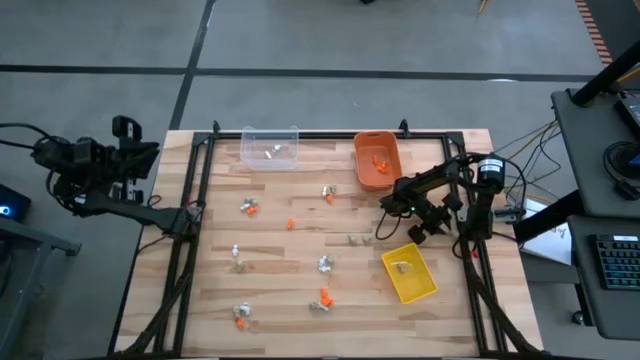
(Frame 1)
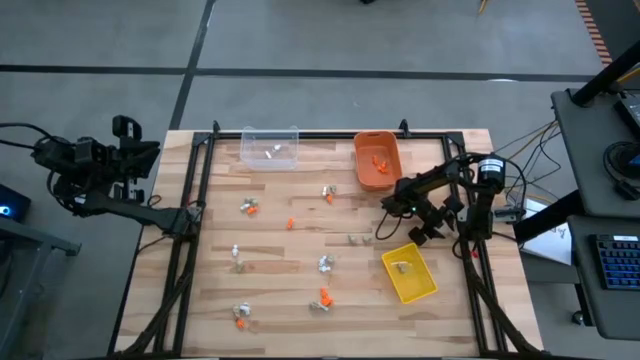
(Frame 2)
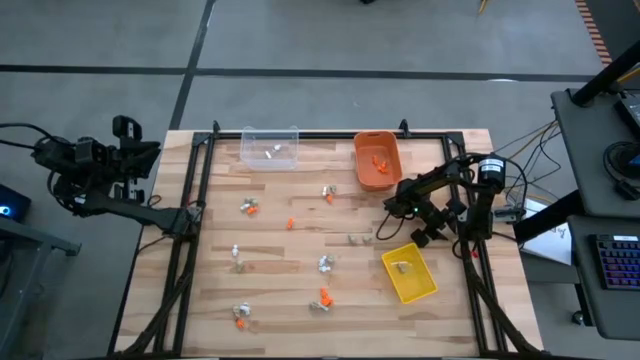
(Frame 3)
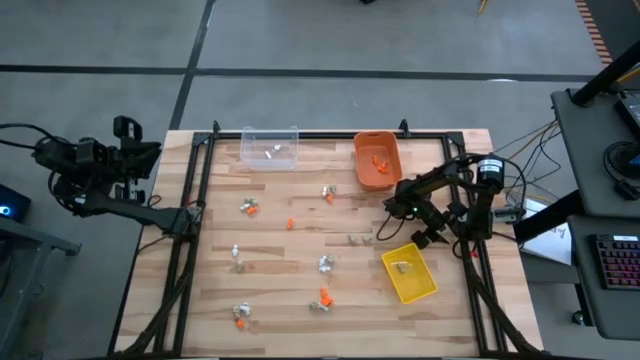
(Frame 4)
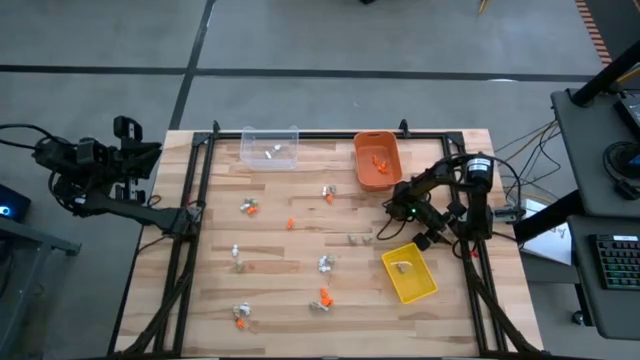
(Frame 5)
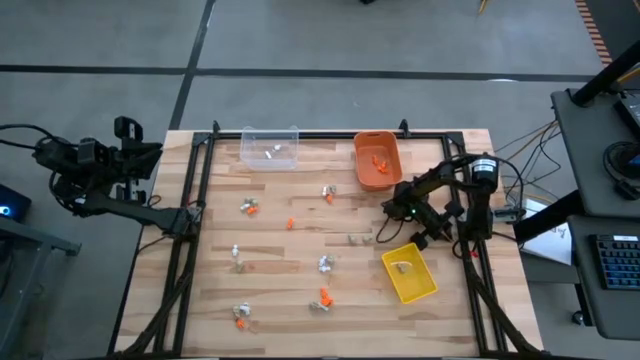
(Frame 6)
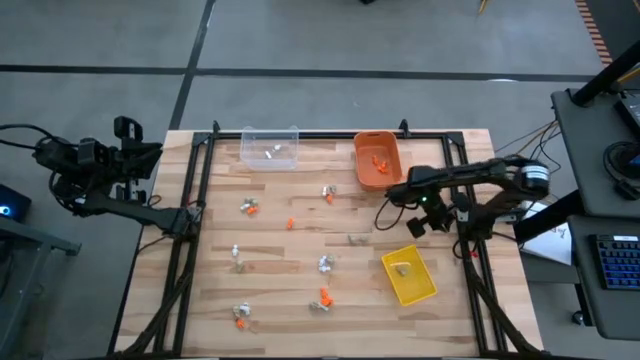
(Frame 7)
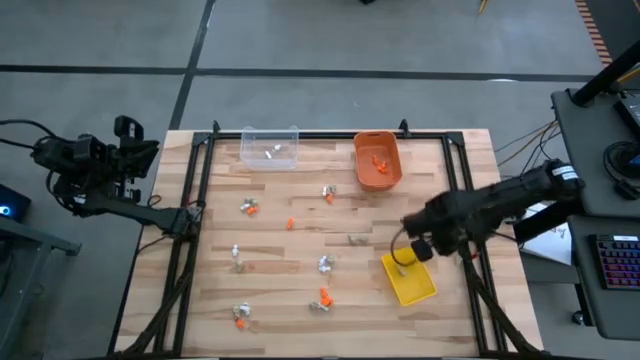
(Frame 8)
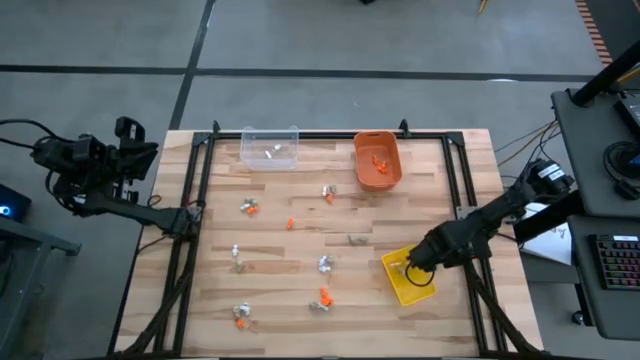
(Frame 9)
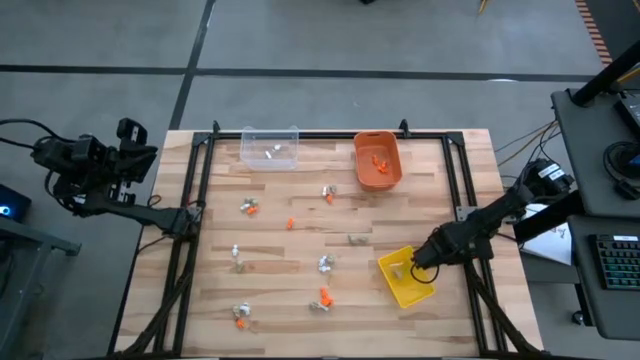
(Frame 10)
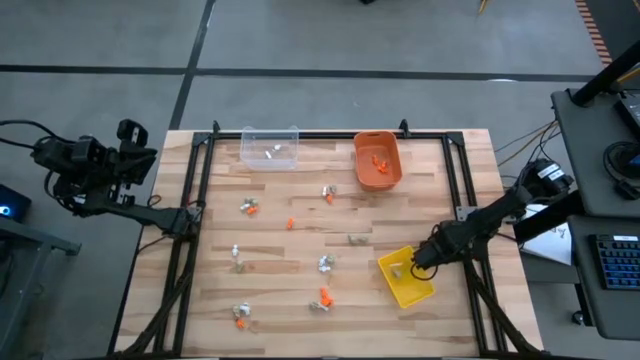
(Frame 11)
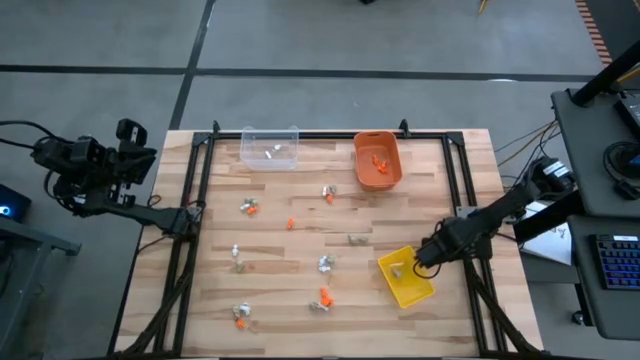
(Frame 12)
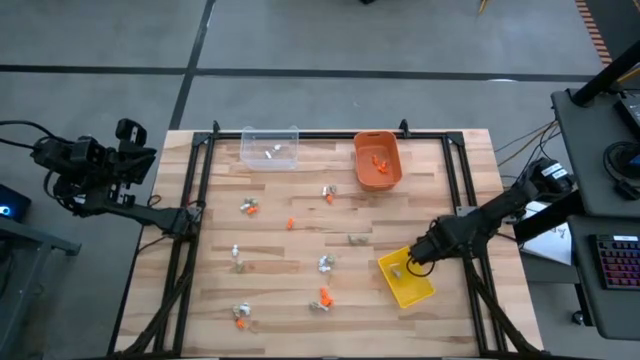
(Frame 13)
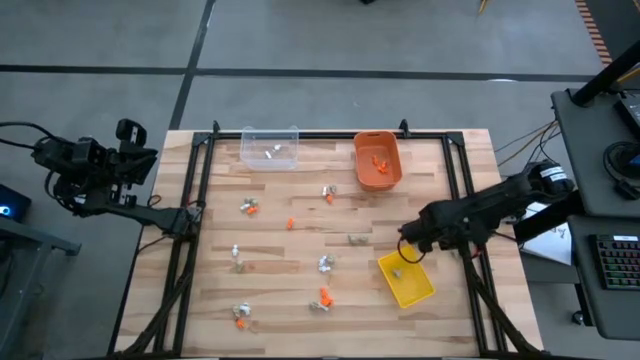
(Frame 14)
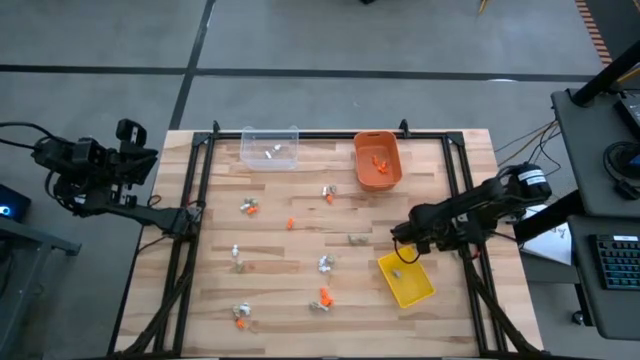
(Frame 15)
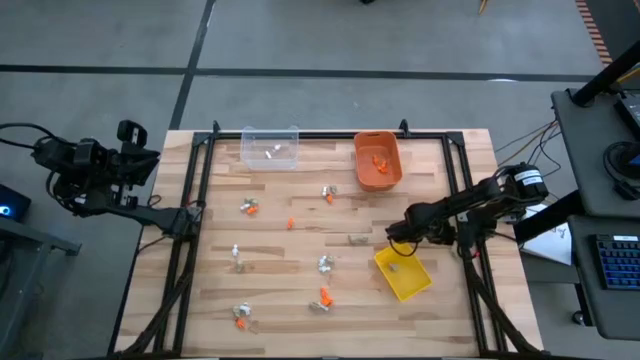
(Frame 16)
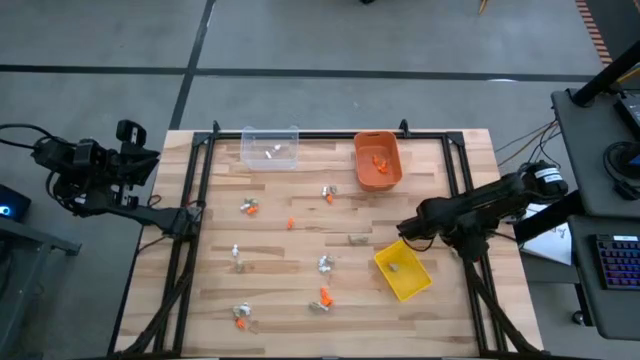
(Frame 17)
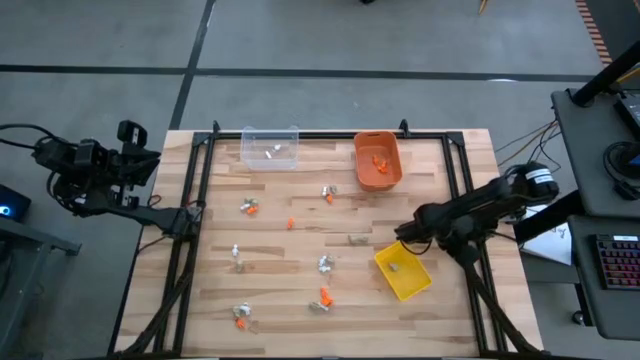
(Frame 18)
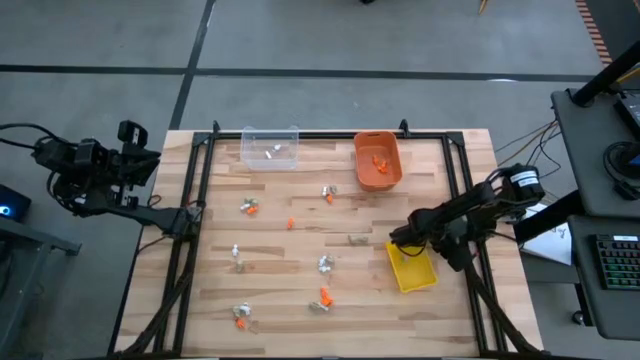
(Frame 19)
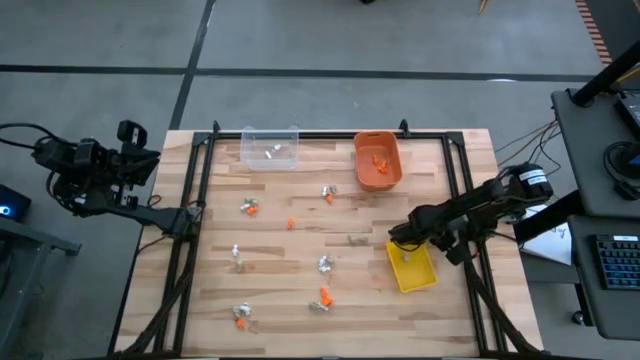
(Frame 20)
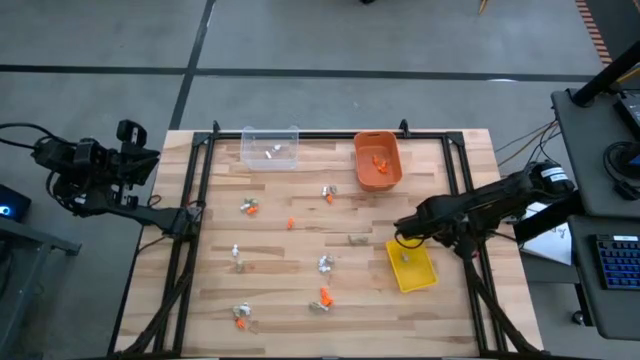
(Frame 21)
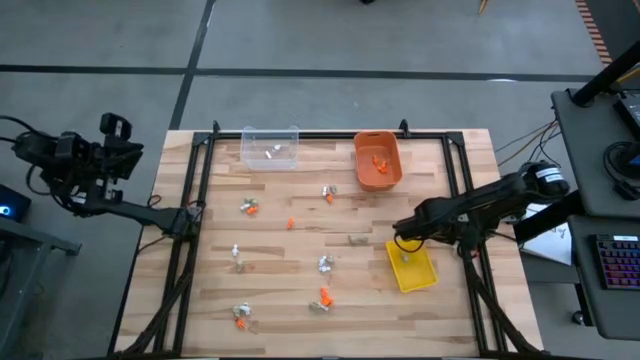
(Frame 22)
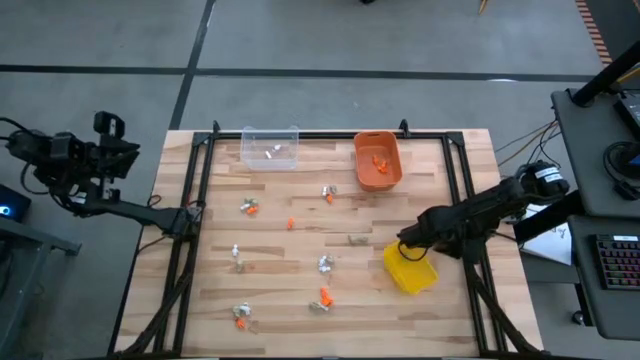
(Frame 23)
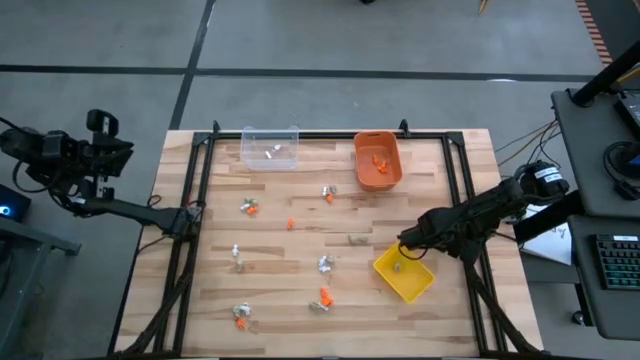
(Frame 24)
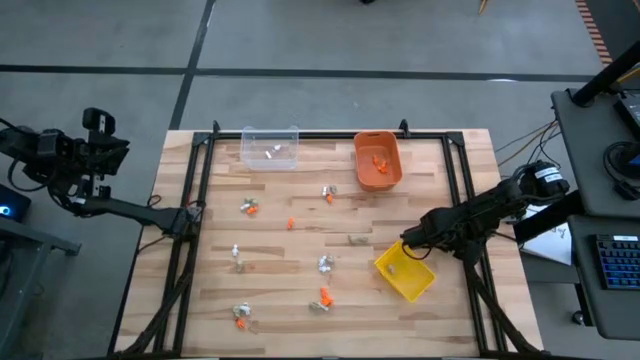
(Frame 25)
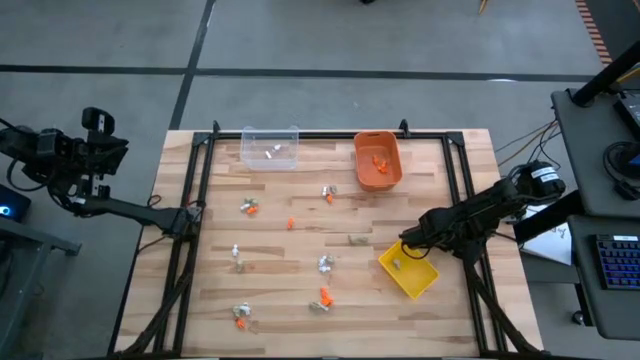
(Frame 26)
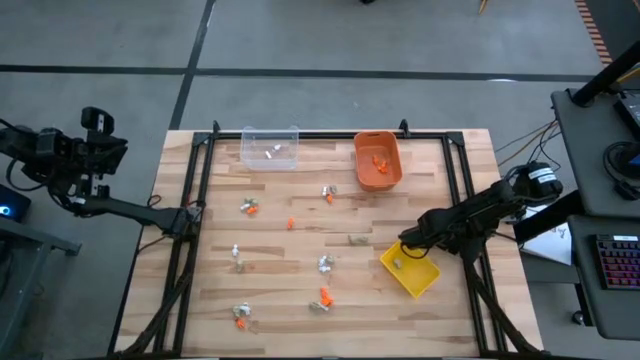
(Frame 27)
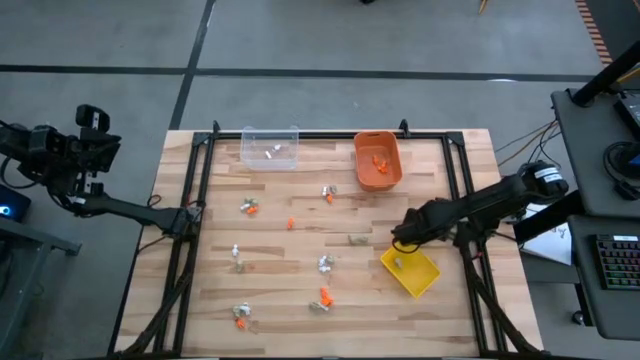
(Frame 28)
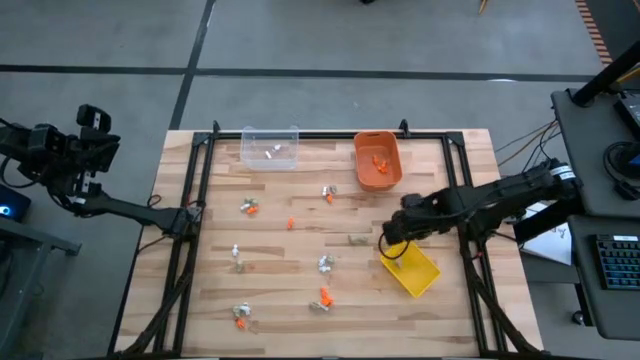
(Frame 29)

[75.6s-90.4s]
Task: Sort Halloween decoration
Put the gray skull toy into the yellow bin

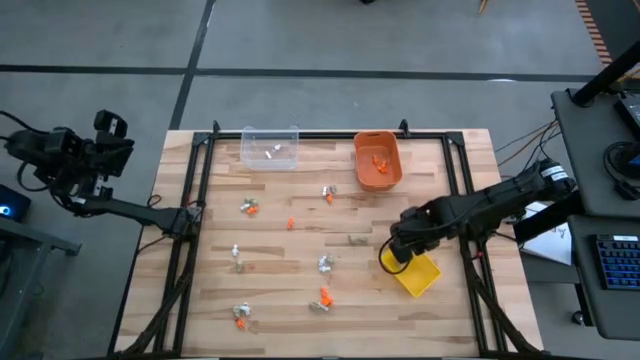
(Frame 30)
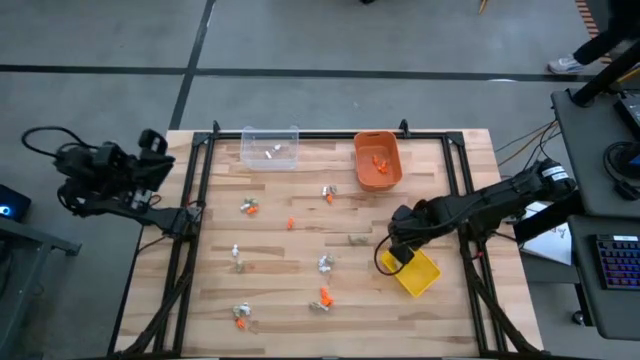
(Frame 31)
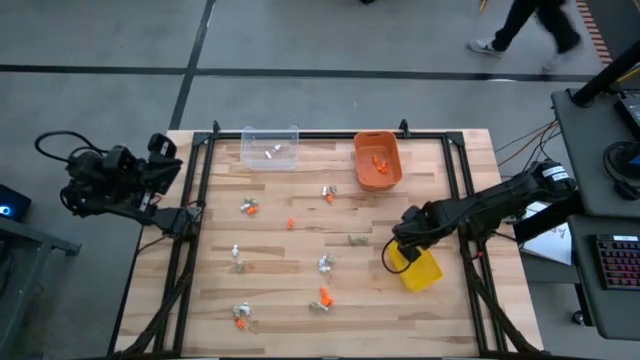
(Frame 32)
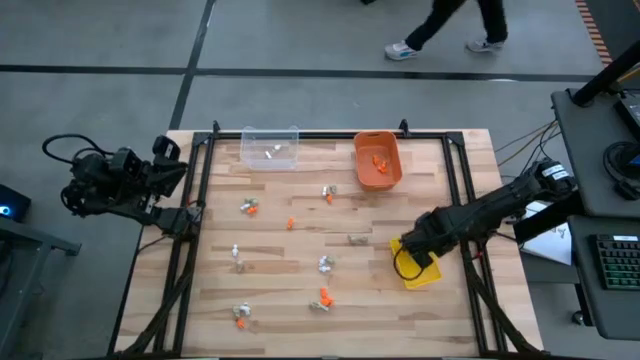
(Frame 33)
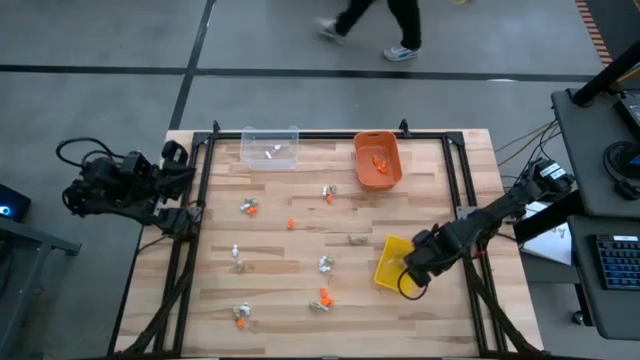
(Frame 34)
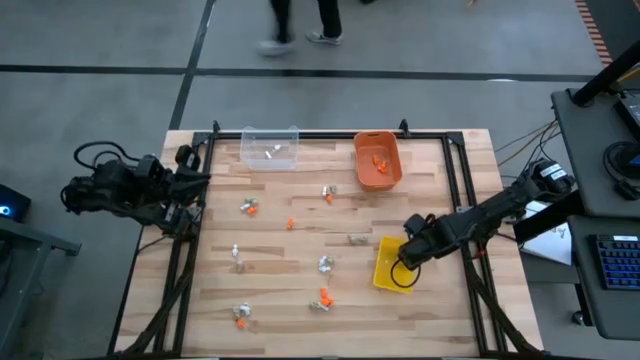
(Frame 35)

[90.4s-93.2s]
Adjust the yellow bin

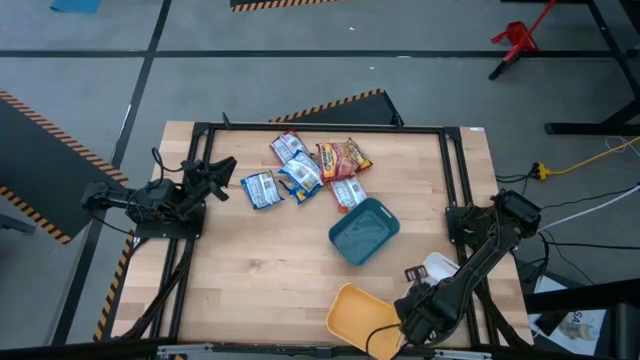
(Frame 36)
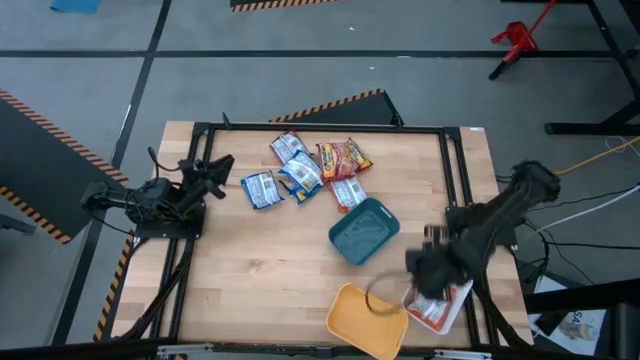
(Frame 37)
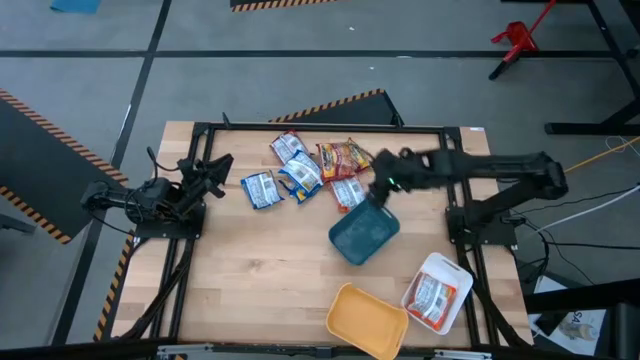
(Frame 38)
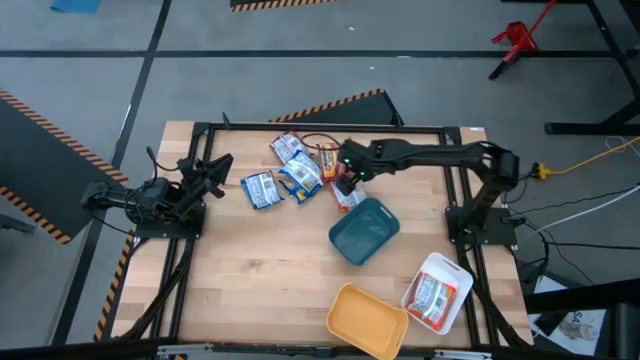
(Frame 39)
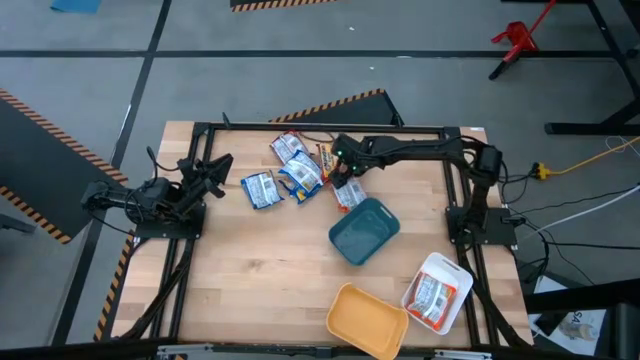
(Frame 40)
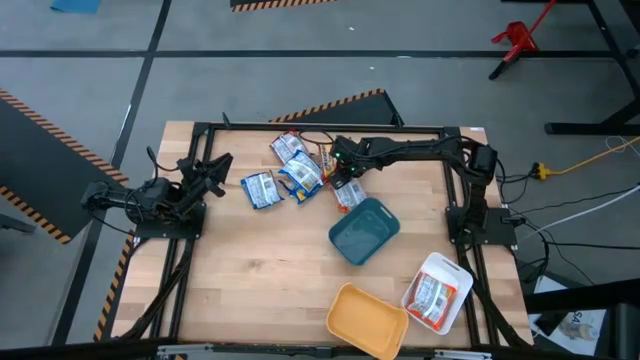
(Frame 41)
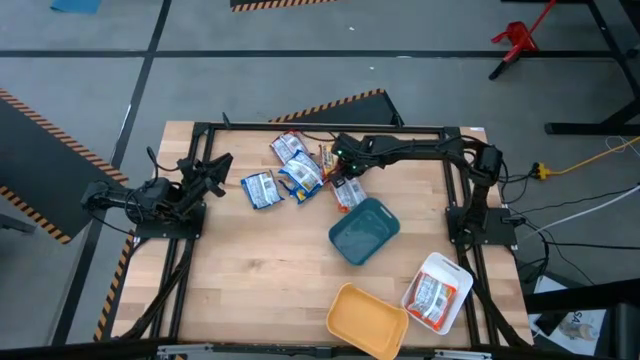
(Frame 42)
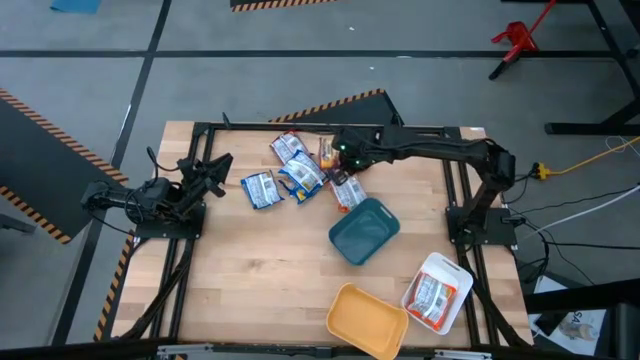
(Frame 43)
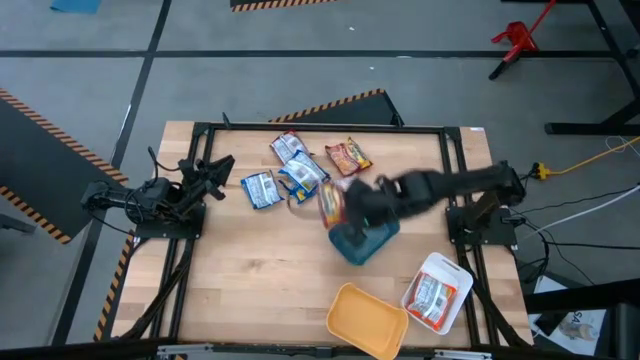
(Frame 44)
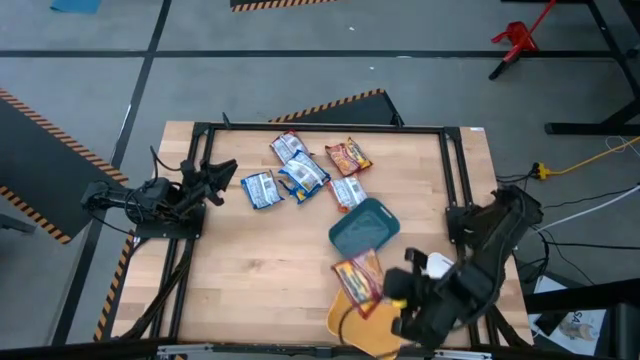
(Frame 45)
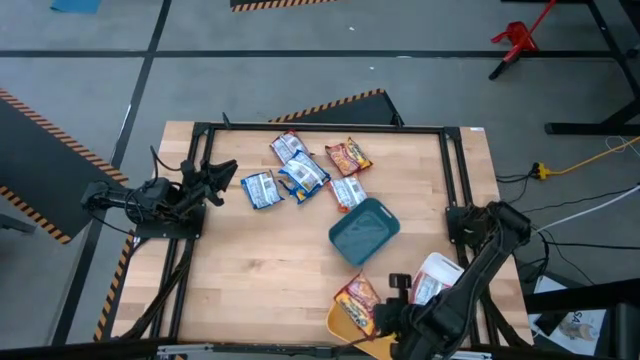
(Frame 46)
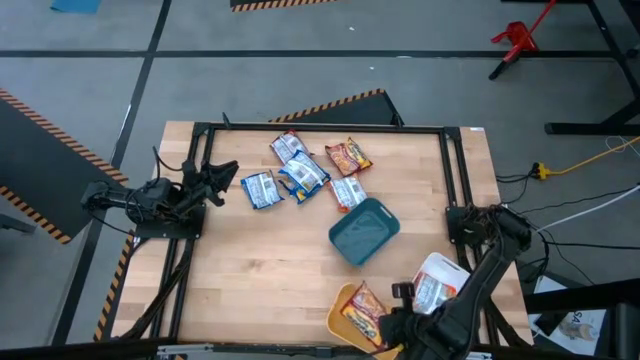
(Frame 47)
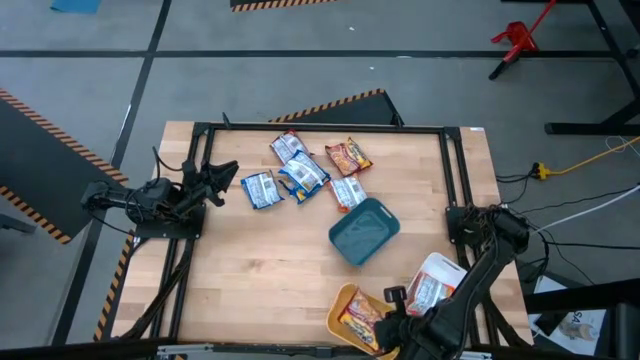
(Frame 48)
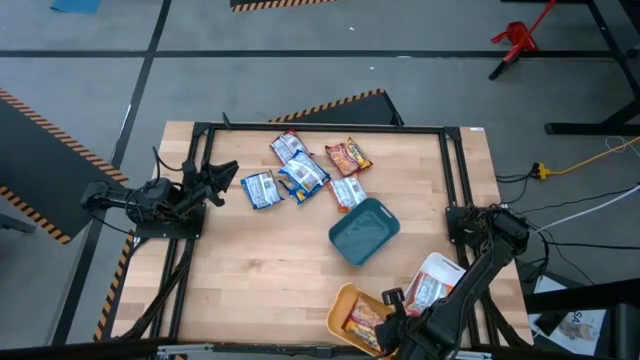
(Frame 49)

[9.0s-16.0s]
Task: Sort Maruchan noodles
Put the top red noodle pack into the yellow bin
